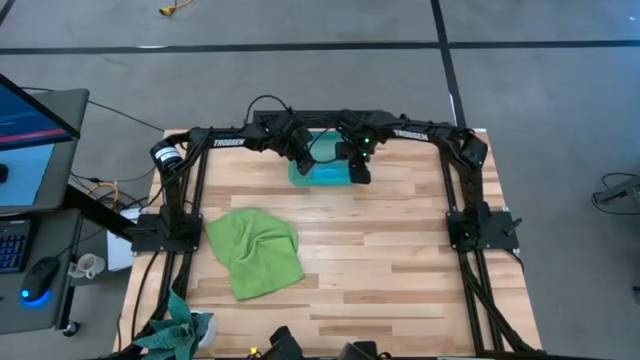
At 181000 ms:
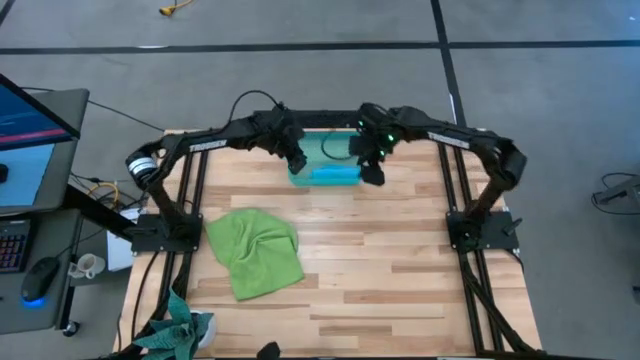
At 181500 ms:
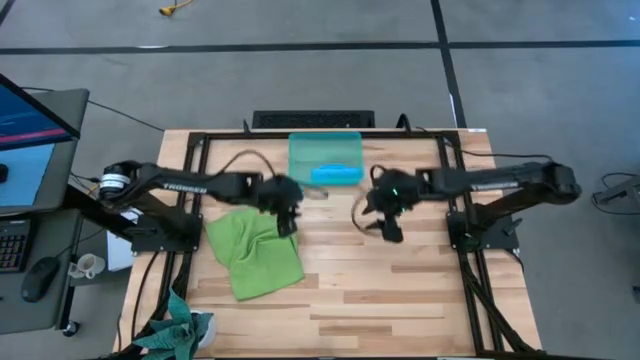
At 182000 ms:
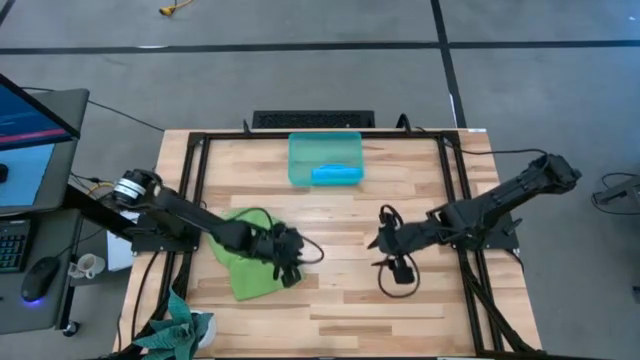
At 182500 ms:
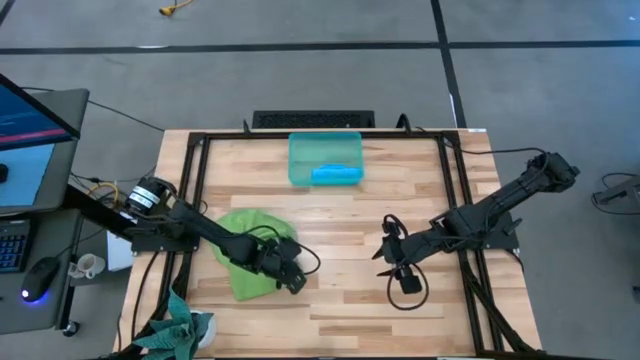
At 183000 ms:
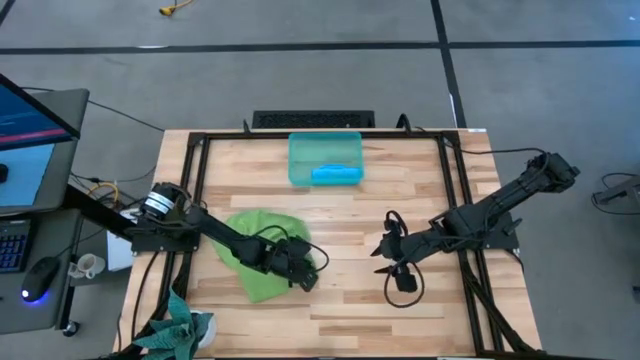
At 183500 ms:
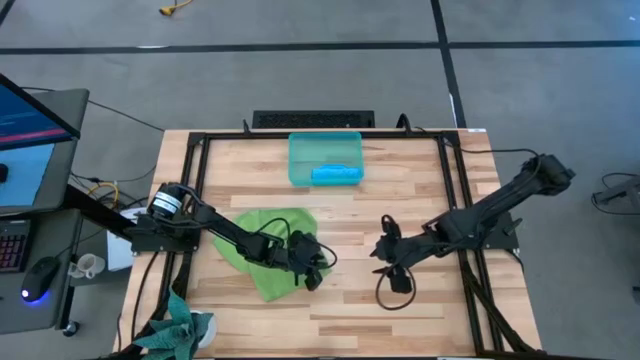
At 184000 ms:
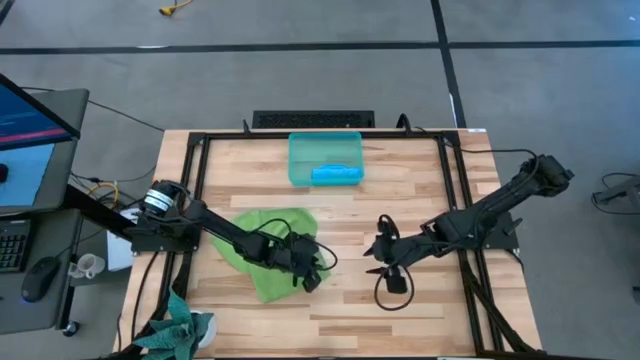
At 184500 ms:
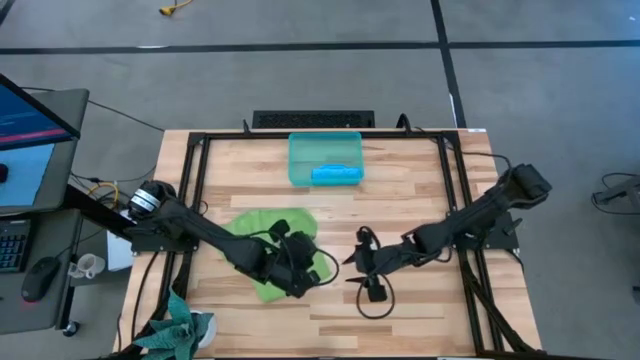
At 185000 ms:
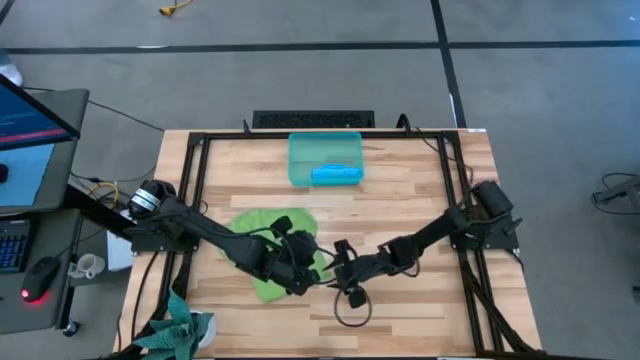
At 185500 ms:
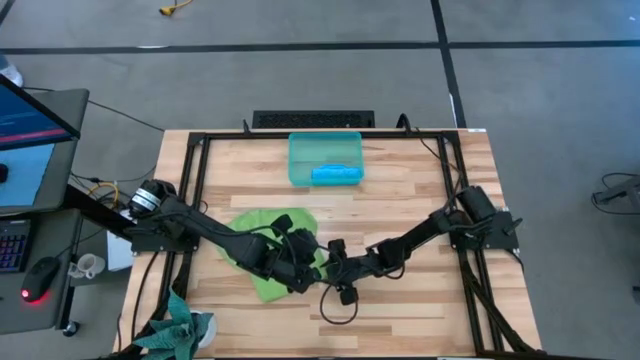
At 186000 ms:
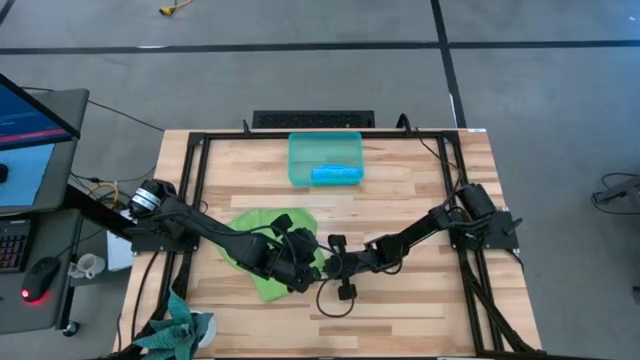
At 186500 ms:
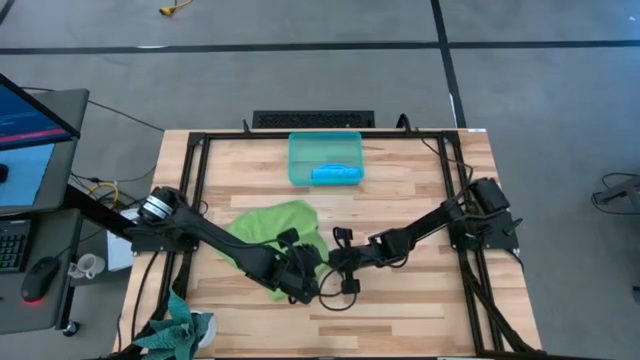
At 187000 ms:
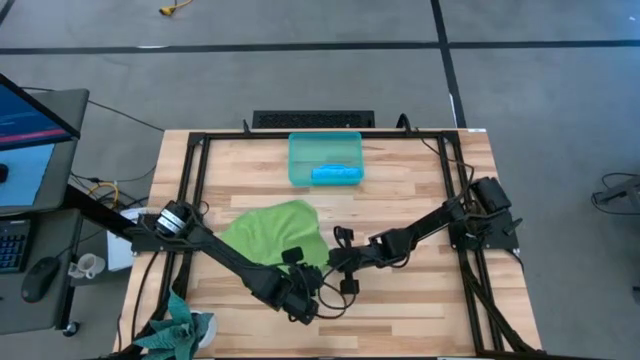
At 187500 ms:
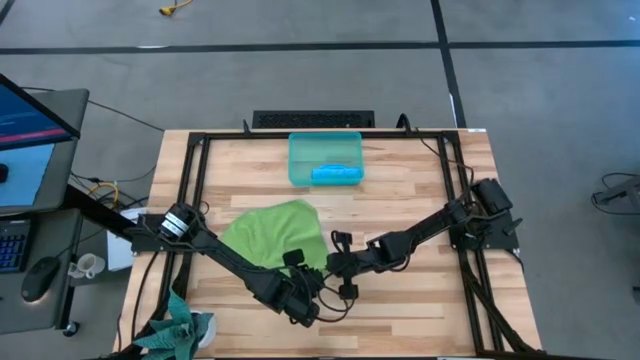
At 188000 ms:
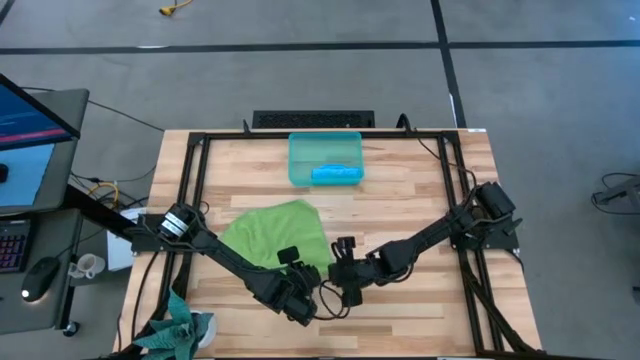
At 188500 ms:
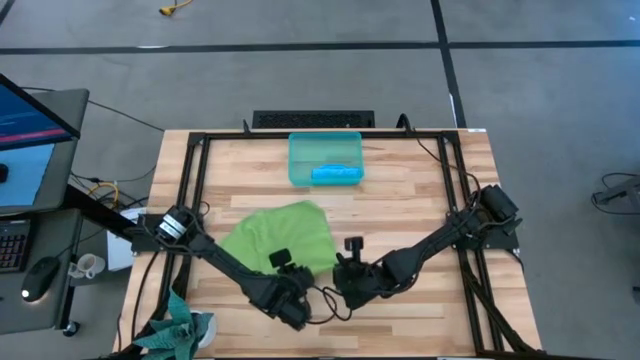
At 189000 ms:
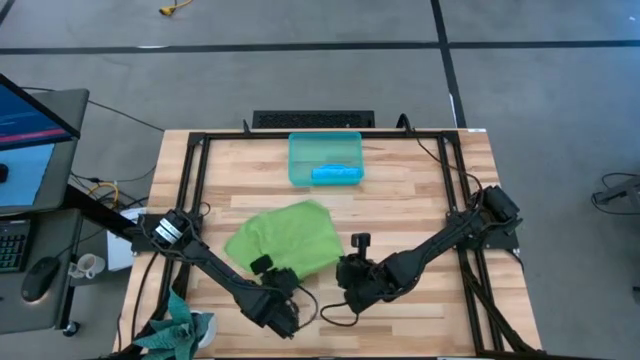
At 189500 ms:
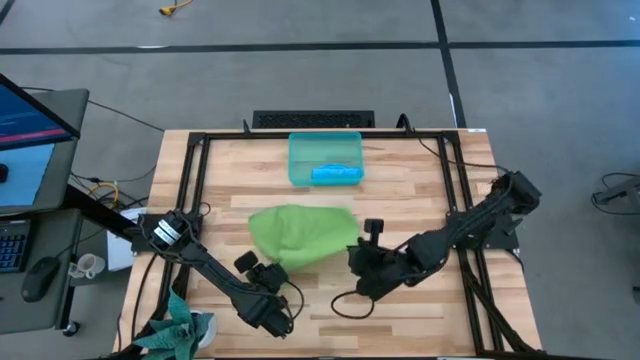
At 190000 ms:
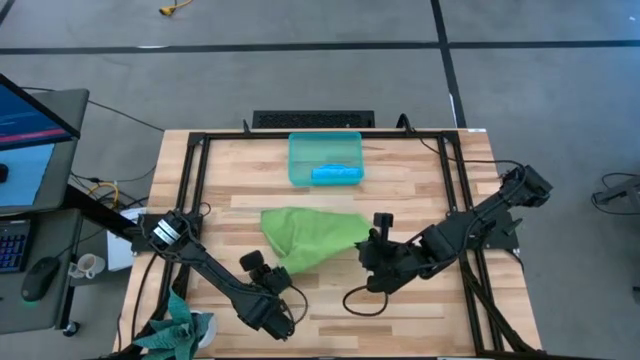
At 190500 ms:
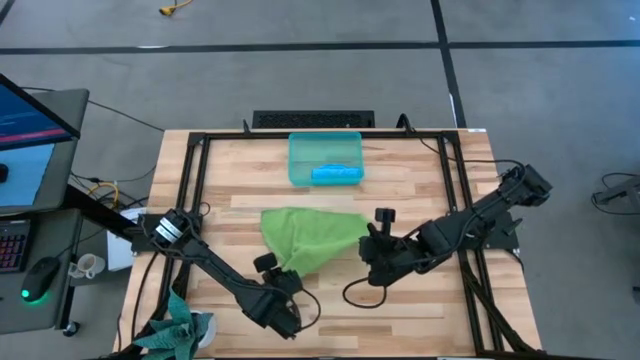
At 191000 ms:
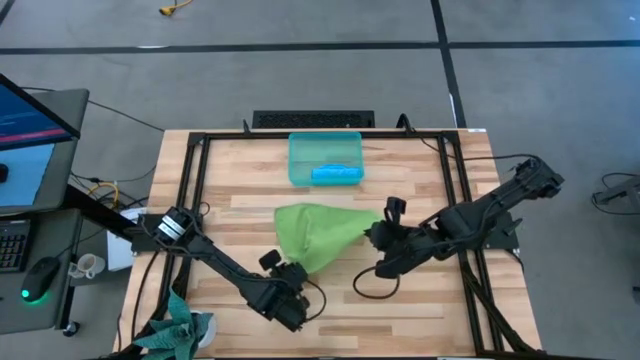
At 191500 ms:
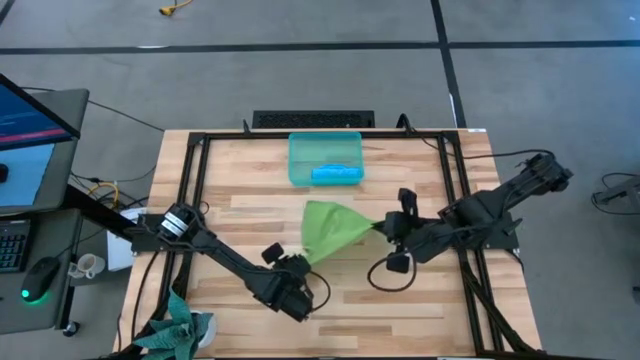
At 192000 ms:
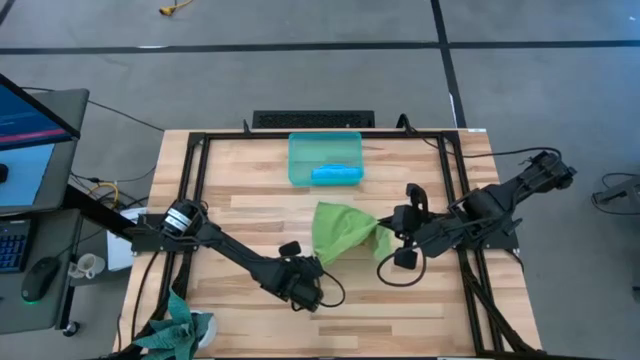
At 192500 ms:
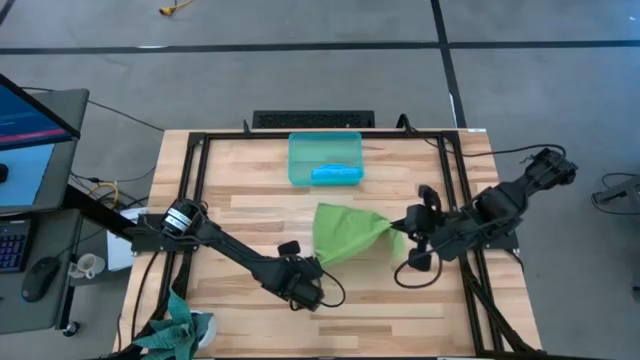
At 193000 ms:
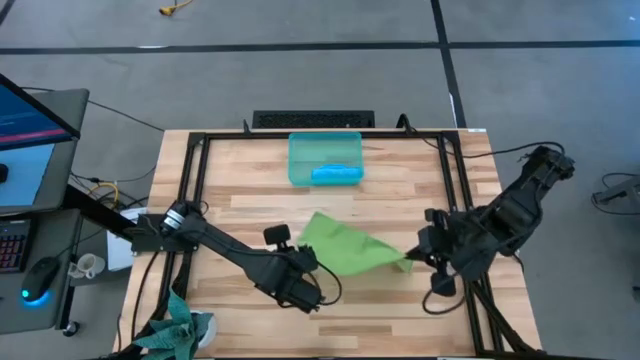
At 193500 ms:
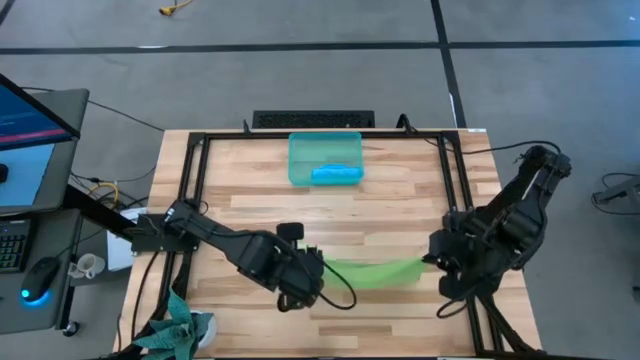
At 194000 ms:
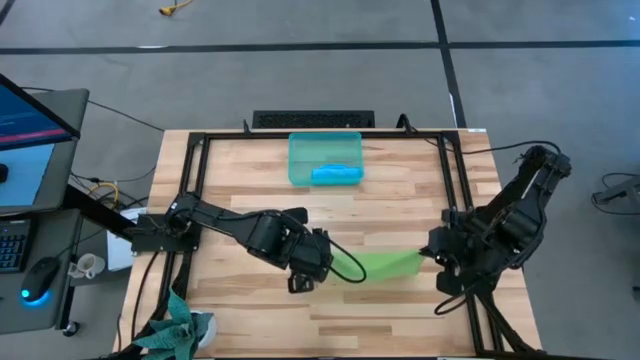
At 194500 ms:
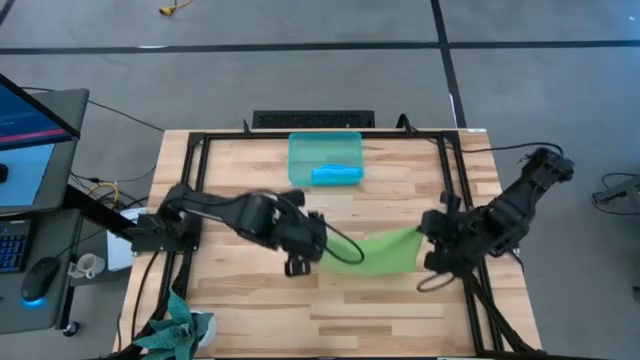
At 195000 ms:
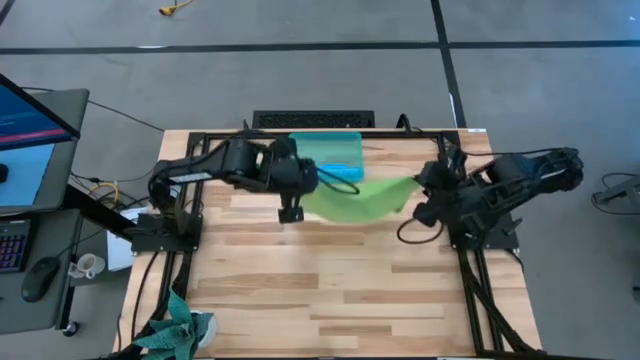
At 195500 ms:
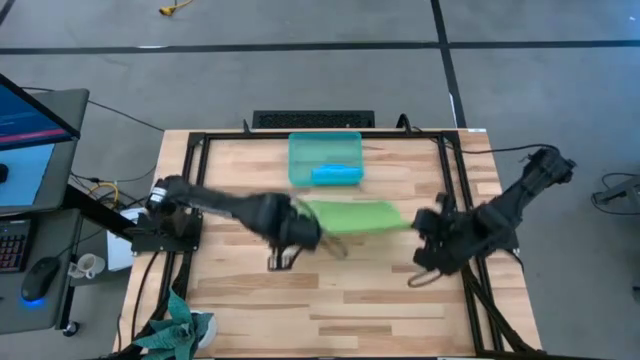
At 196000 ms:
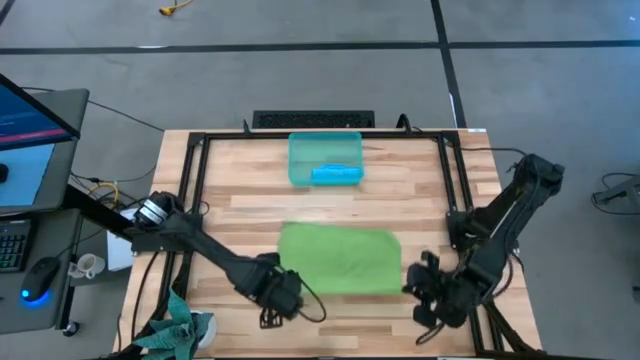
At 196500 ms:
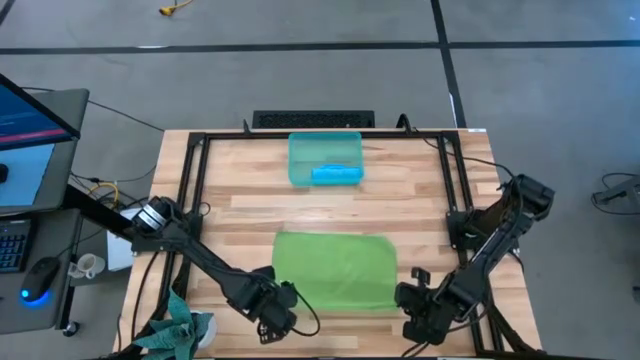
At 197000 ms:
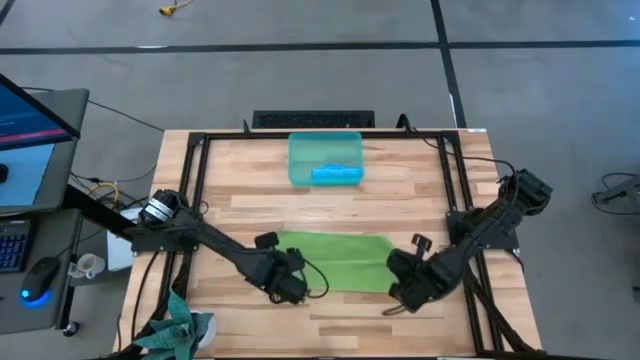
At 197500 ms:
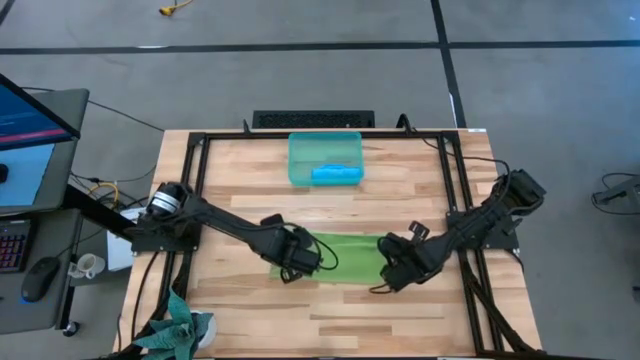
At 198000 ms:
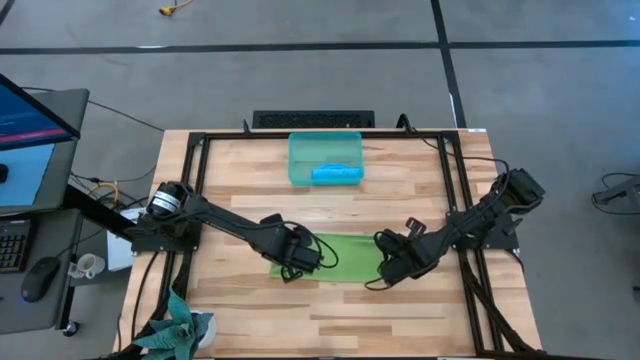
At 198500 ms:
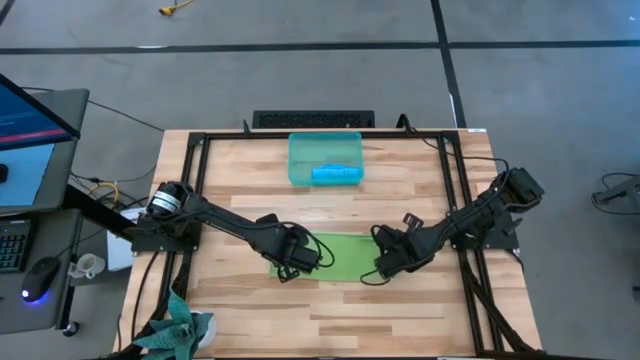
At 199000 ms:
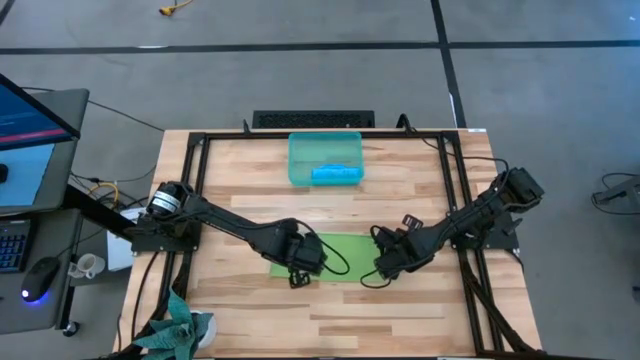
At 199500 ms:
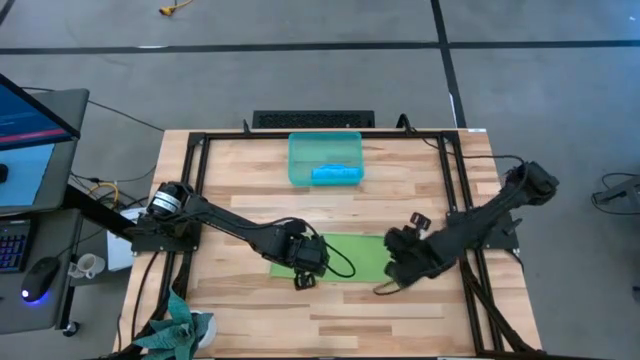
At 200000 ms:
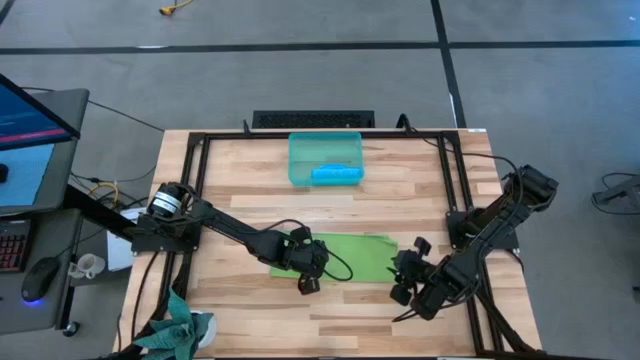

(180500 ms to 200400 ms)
Task: Roll microfiber towels into tight, uniform cylinder then place into a basket
Fold the green microfiber cloth

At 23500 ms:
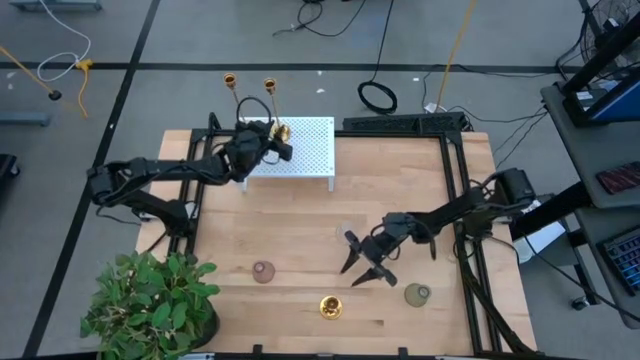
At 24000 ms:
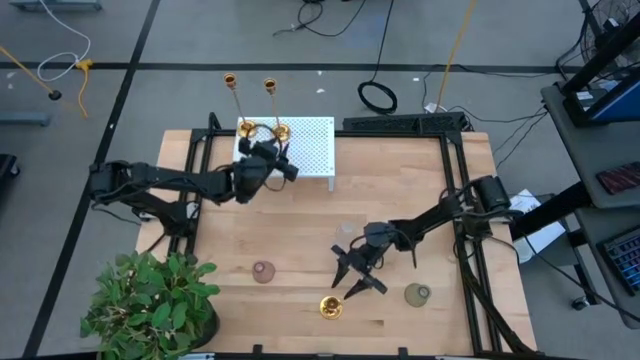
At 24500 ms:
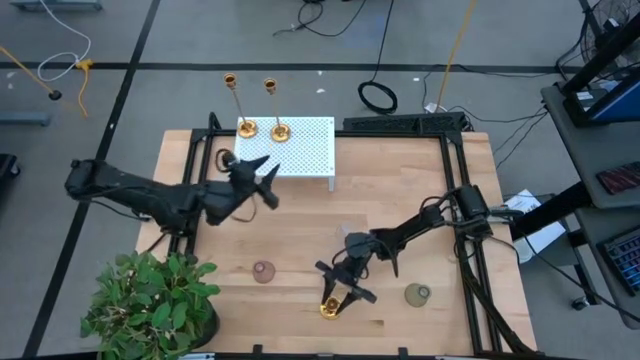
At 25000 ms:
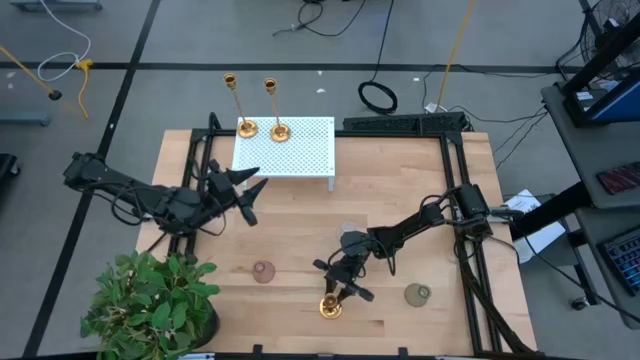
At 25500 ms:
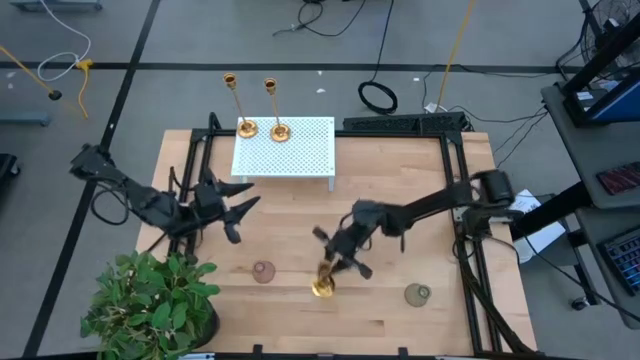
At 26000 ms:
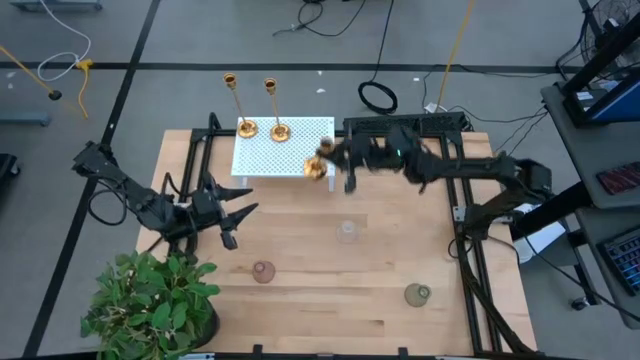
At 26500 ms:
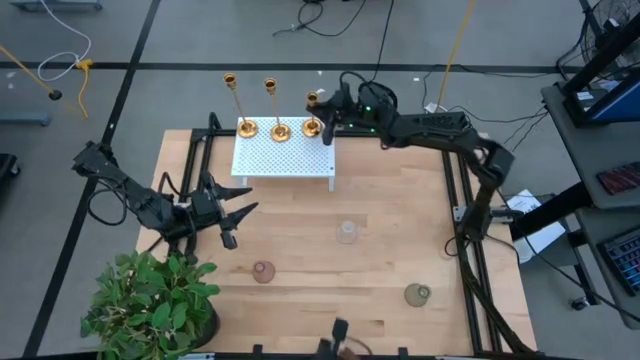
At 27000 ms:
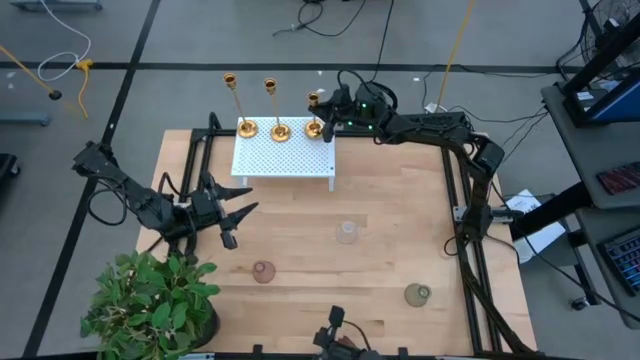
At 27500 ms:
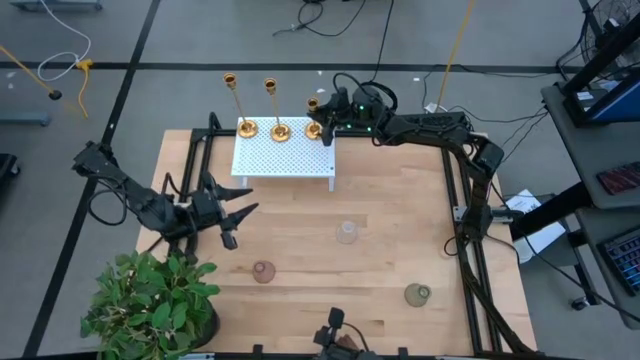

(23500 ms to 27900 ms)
Task: Pick & Place candle stick holders
Put the yellow candle stand on the shelf
